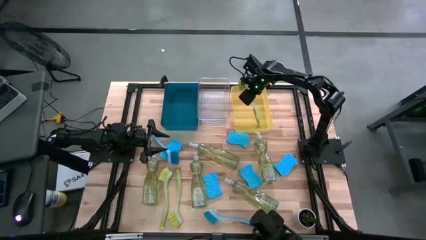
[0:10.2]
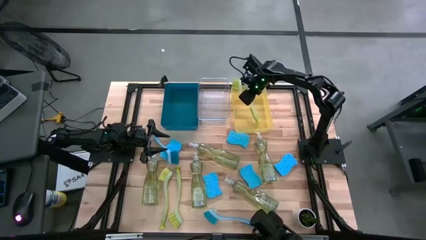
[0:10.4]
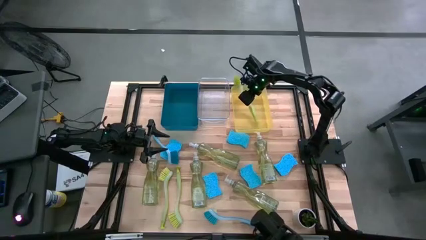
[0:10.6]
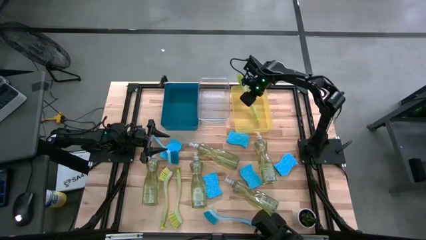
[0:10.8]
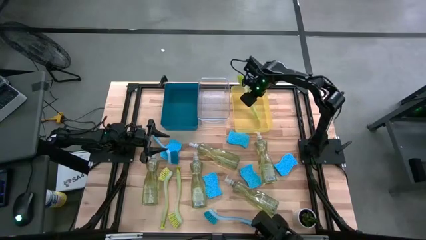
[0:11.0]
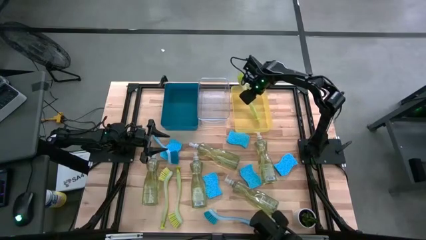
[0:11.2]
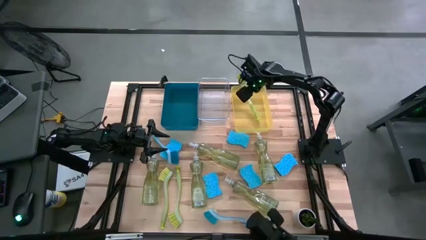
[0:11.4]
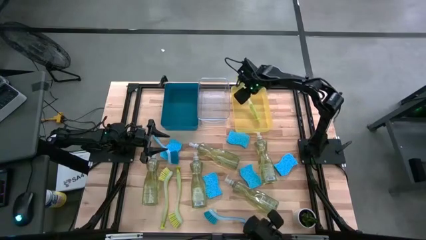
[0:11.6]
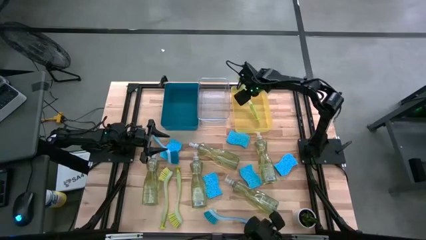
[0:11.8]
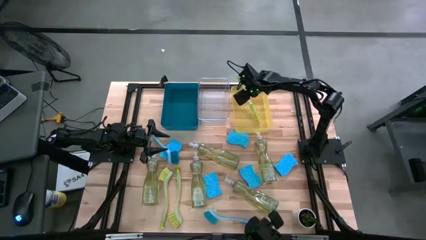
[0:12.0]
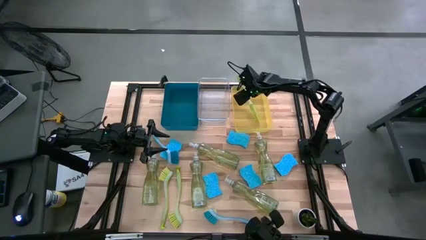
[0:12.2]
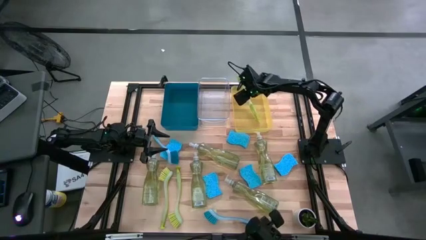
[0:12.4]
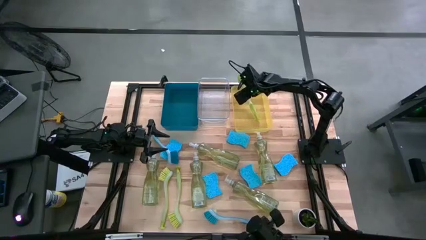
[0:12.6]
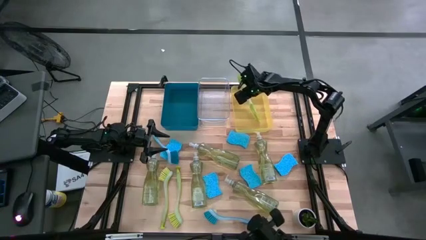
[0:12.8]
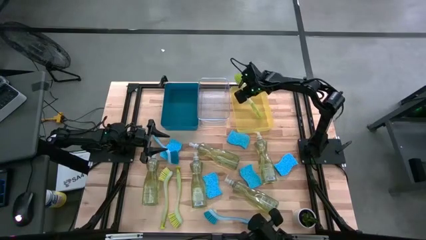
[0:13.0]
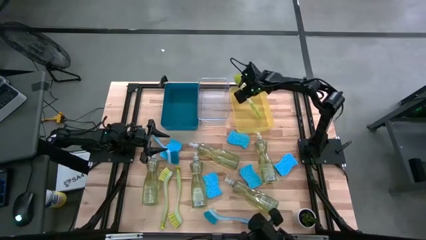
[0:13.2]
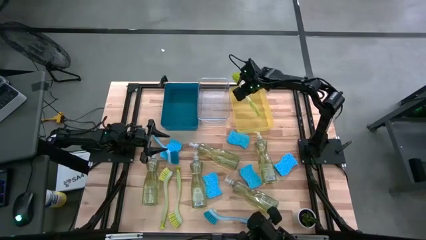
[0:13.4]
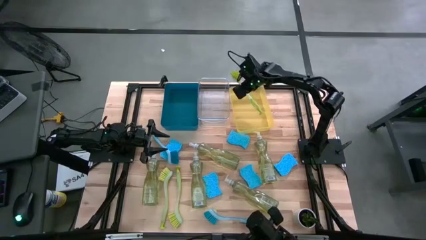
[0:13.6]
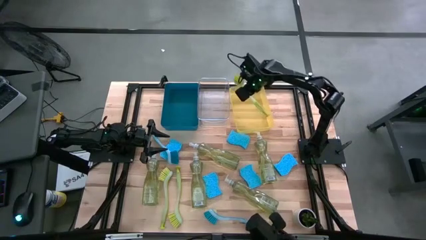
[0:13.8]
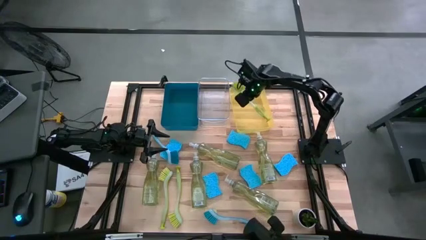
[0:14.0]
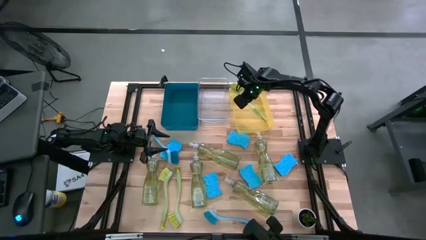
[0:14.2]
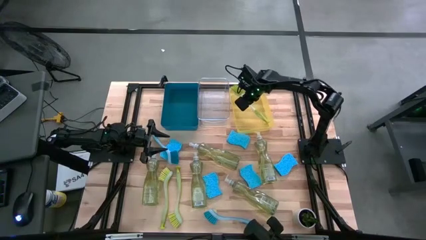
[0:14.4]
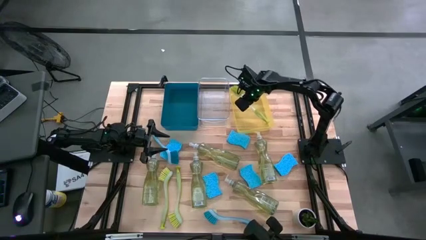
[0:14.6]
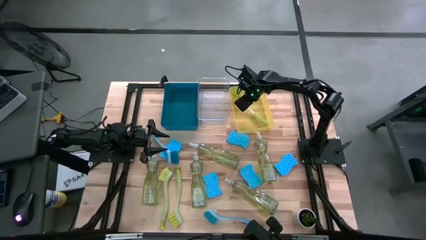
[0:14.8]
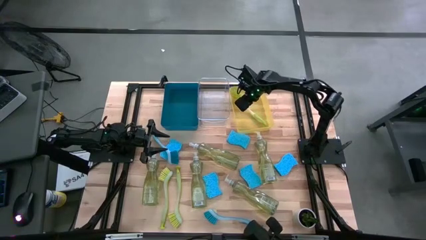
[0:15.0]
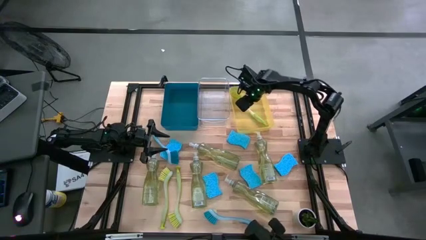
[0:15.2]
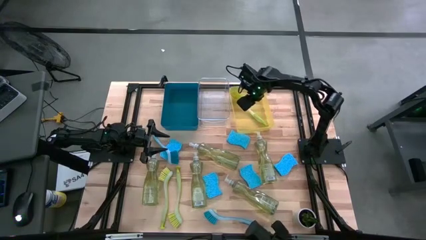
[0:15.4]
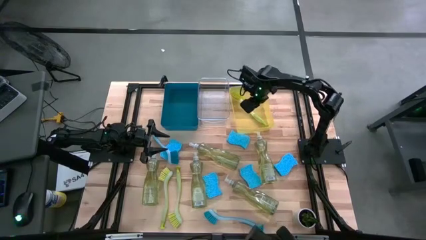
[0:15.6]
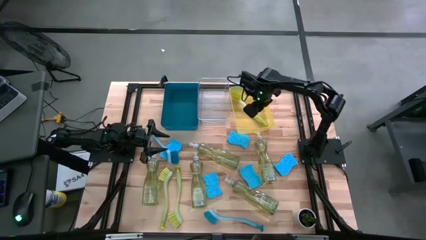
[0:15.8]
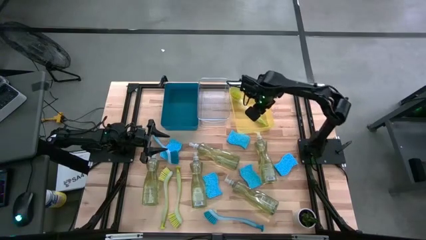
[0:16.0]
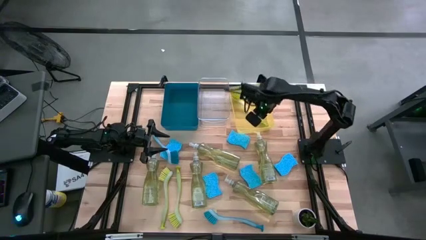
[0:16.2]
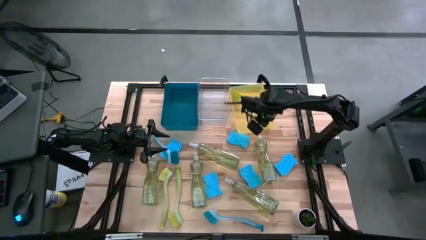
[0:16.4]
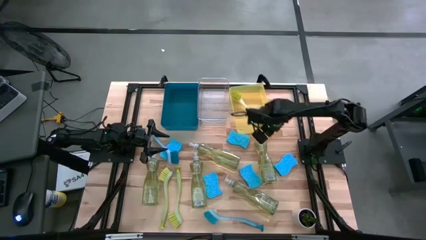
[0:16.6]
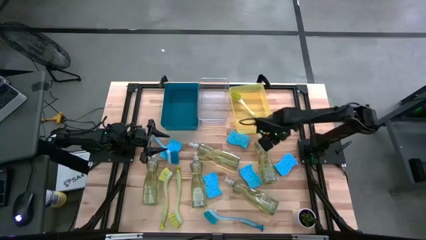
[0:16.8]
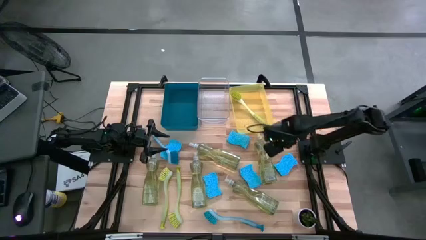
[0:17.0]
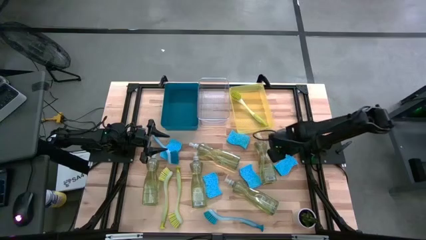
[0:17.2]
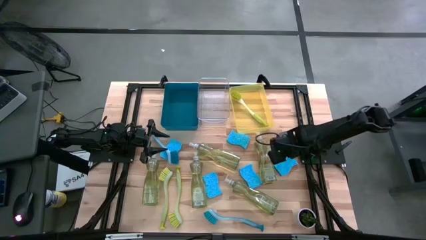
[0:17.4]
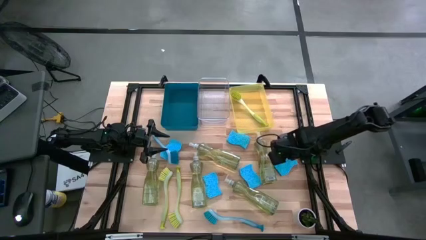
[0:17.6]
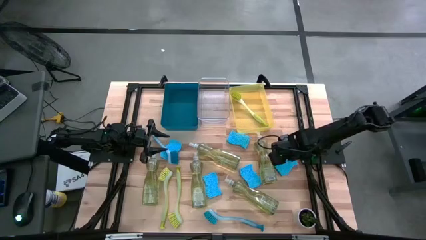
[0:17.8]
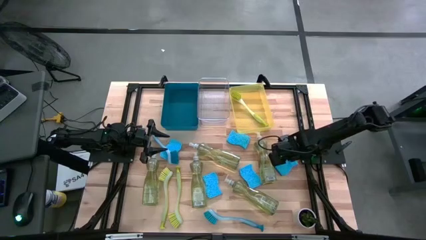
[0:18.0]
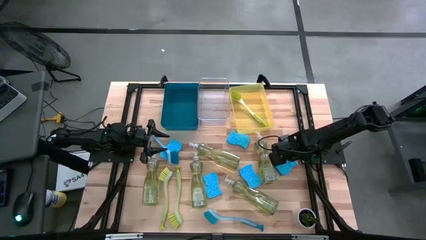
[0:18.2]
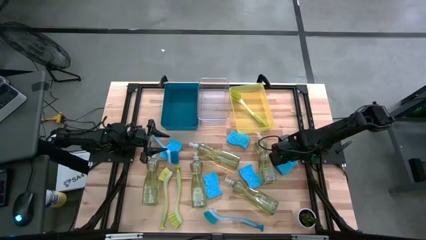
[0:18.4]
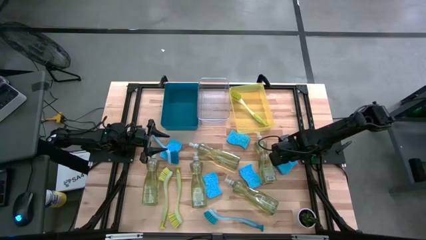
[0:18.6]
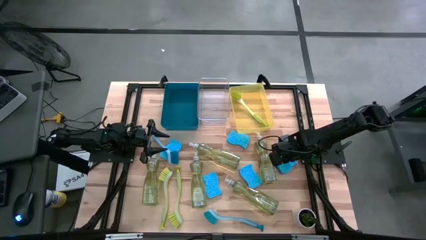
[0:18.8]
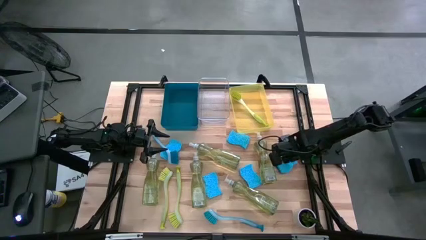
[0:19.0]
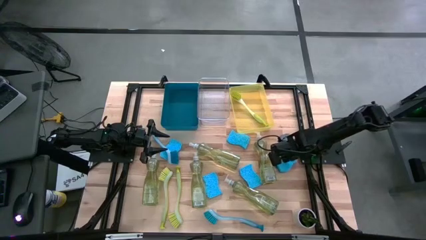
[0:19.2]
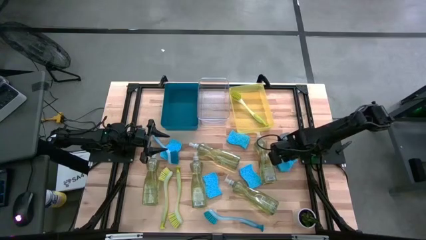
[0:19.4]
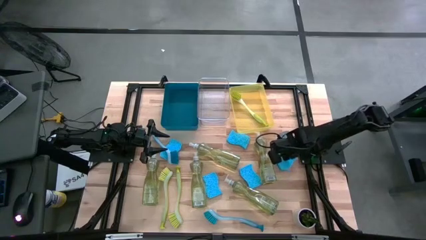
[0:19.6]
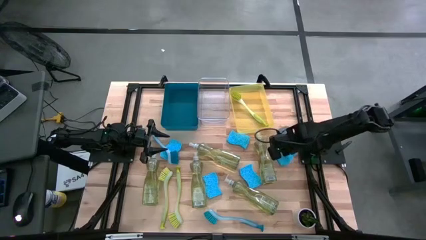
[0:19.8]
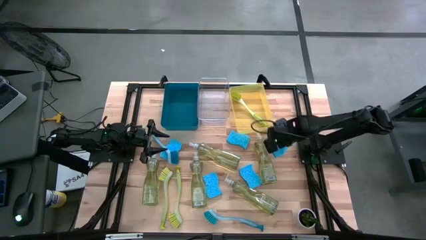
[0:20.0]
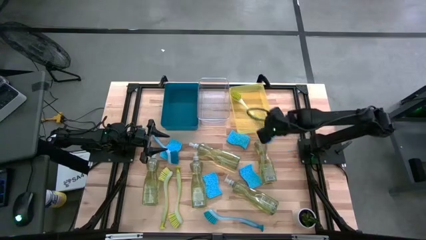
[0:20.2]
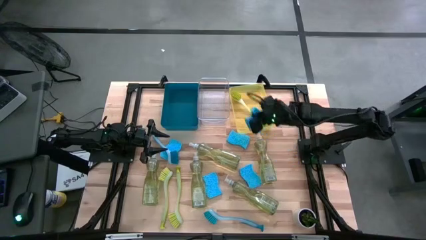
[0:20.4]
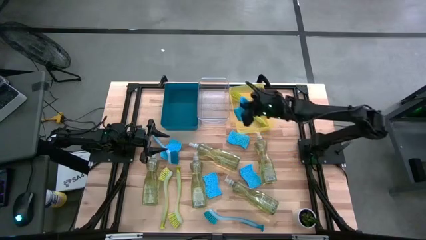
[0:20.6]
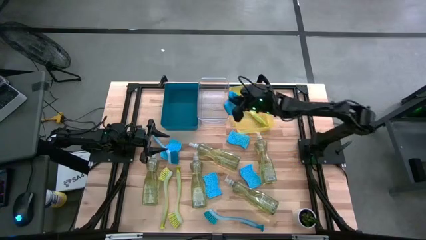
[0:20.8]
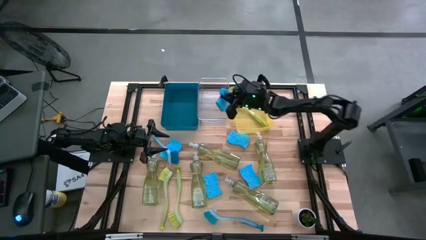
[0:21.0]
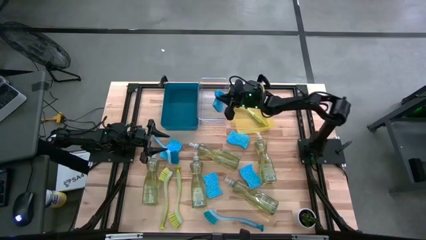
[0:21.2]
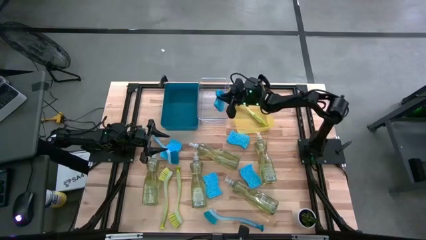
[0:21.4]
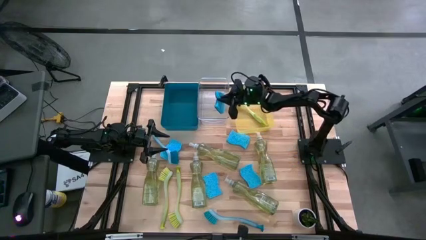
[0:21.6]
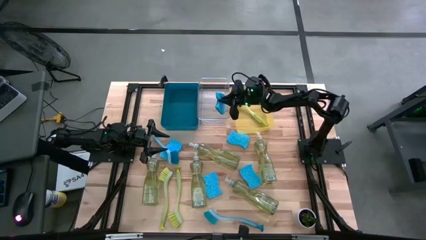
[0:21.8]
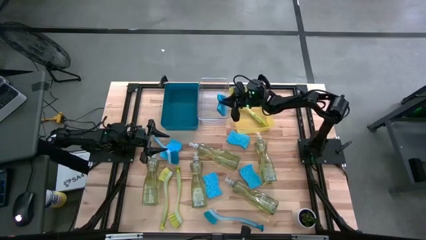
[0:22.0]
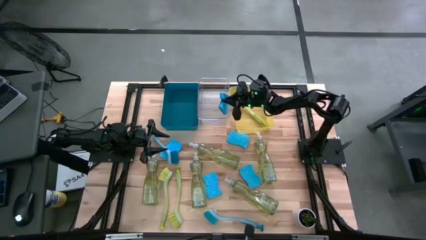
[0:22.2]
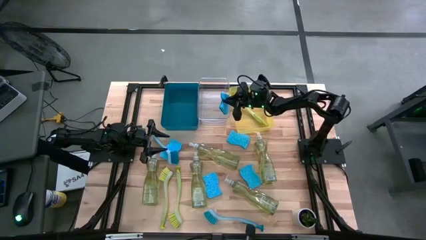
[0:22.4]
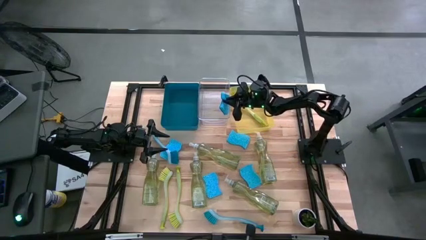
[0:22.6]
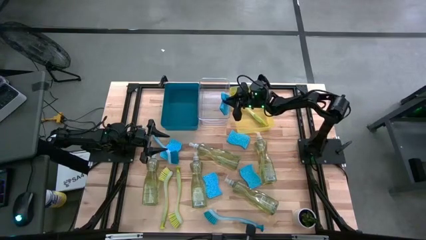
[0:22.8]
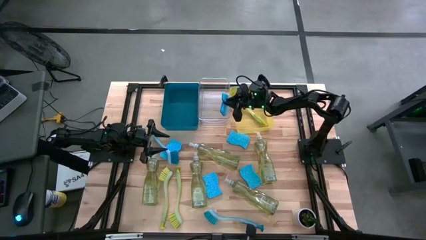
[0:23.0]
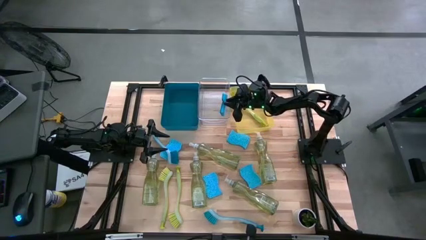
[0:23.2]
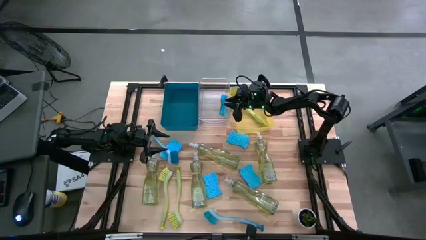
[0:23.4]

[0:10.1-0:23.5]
Task: Pick & Place Kitchen Sink Supplies
Put the blue sponge into the transparent bin

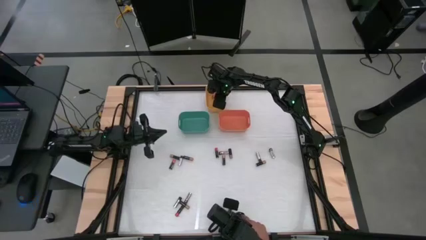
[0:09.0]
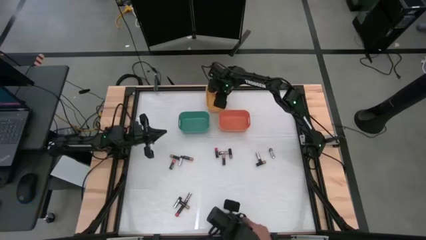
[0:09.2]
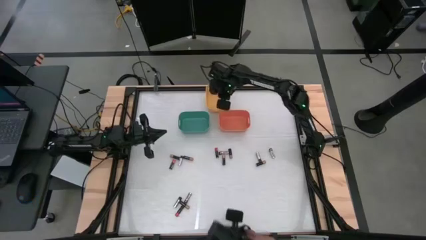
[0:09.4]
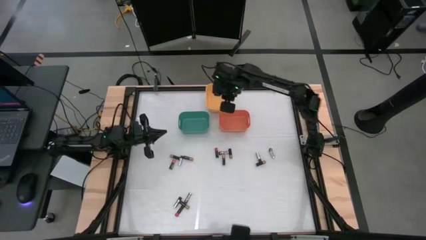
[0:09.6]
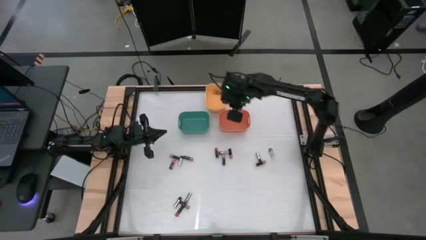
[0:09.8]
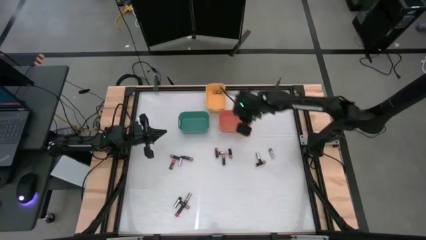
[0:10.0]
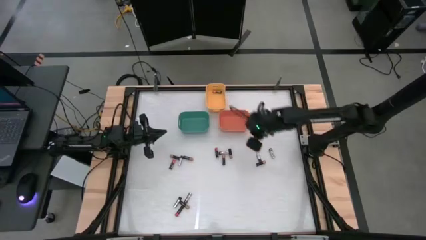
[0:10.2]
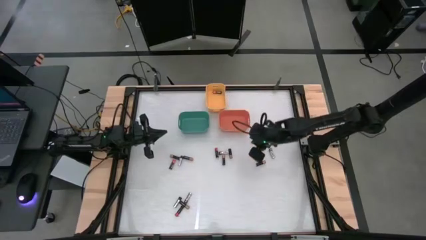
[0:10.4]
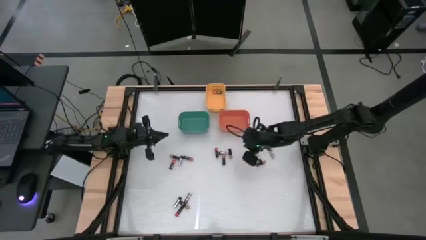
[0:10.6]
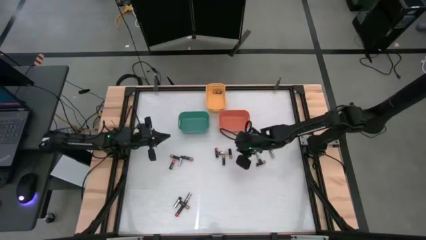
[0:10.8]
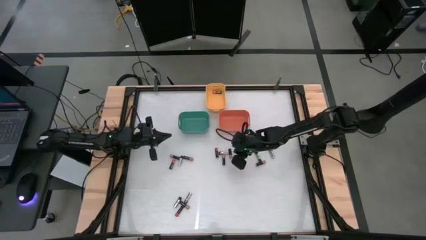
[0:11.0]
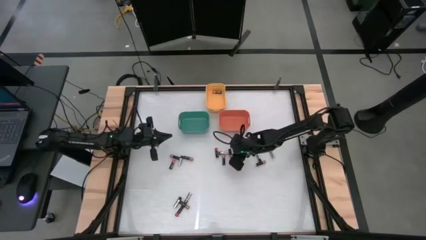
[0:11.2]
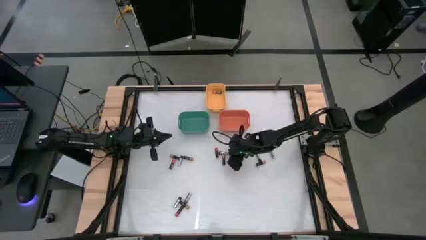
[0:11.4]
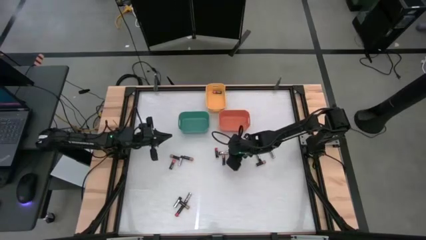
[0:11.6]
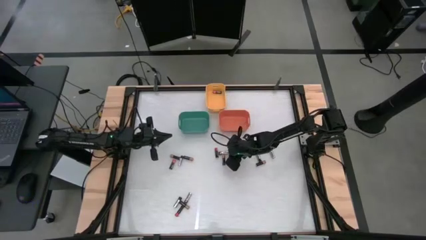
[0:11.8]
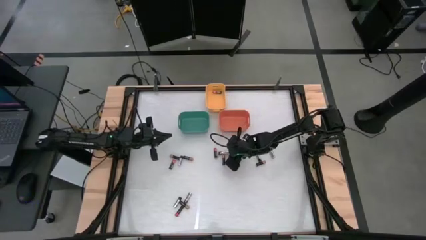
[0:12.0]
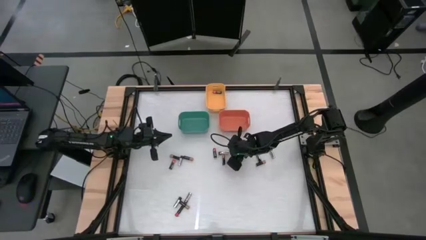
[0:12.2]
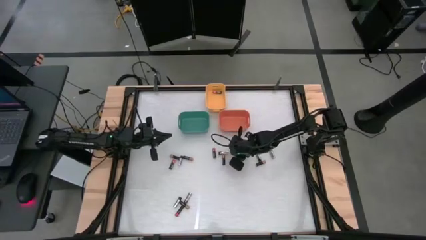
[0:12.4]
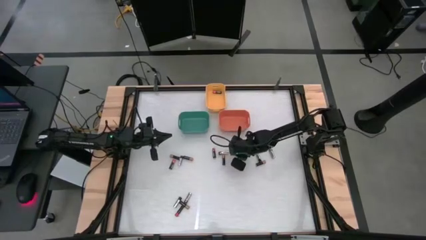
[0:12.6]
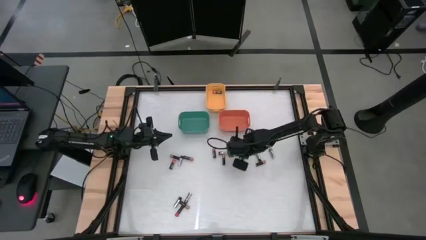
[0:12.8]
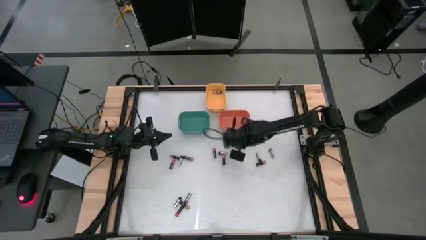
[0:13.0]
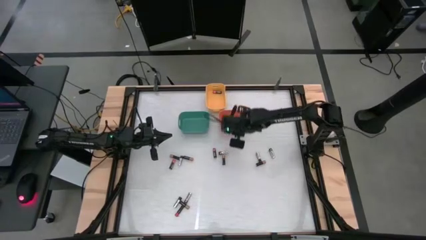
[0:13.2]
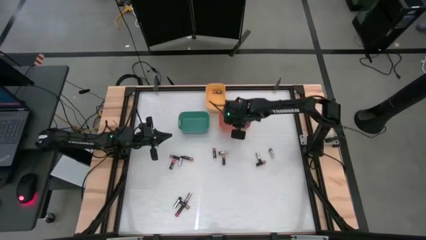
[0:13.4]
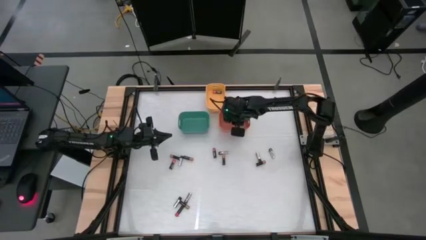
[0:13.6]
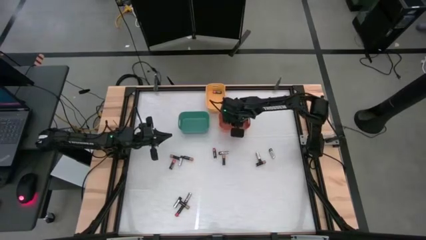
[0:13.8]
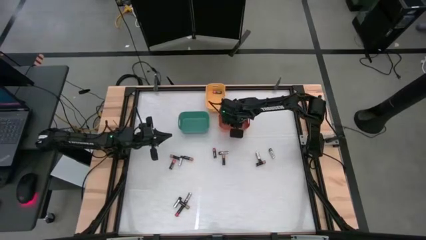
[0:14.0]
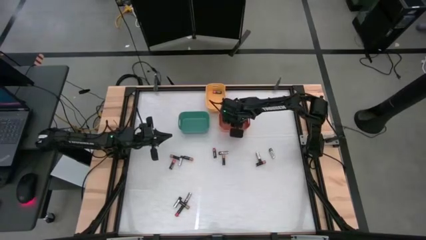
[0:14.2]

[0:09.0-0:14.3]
Task: Sort batteries
Put the brown battery into the orange bin
